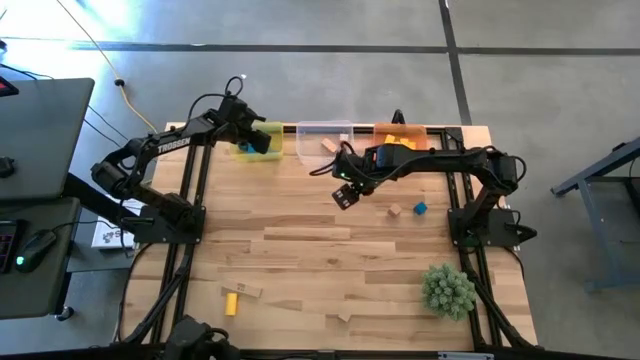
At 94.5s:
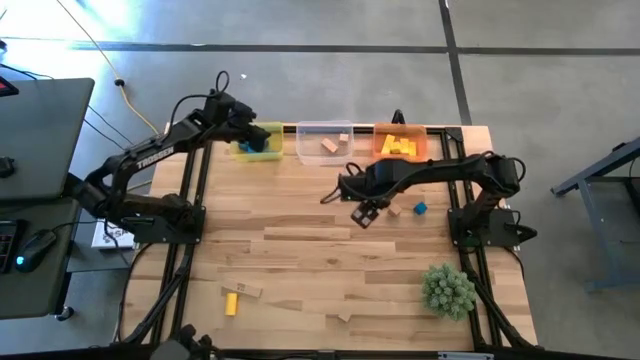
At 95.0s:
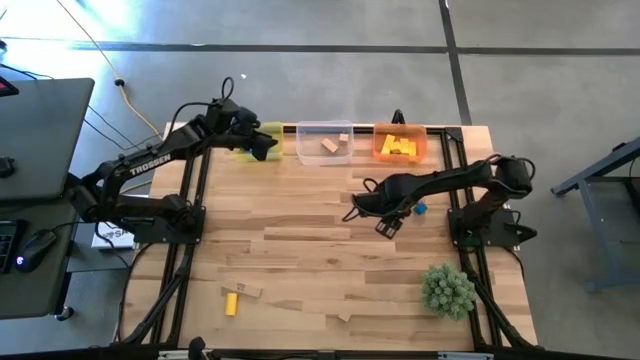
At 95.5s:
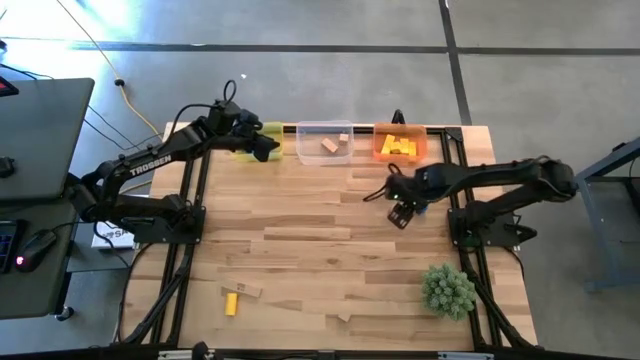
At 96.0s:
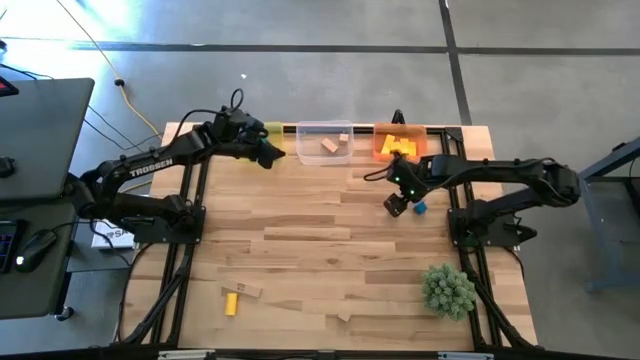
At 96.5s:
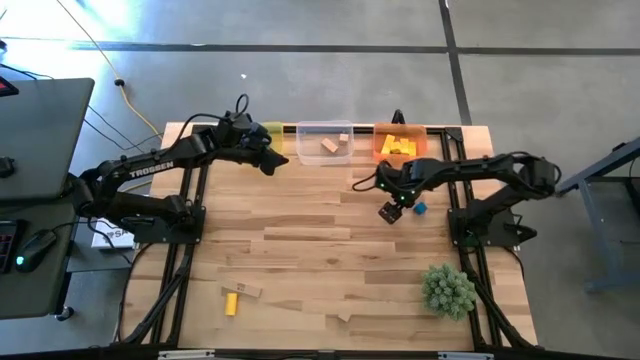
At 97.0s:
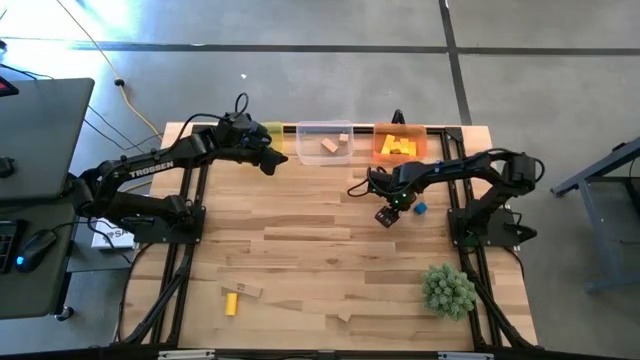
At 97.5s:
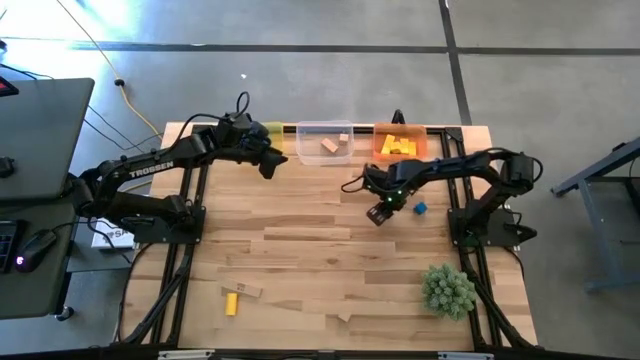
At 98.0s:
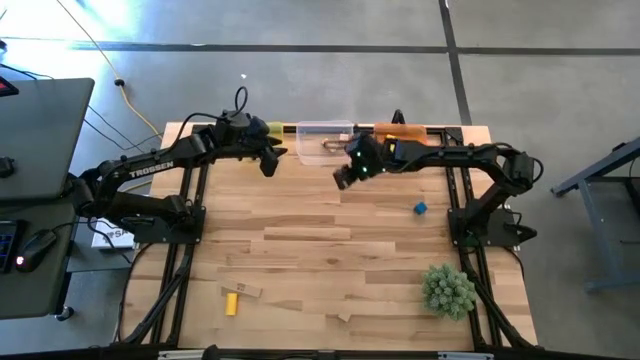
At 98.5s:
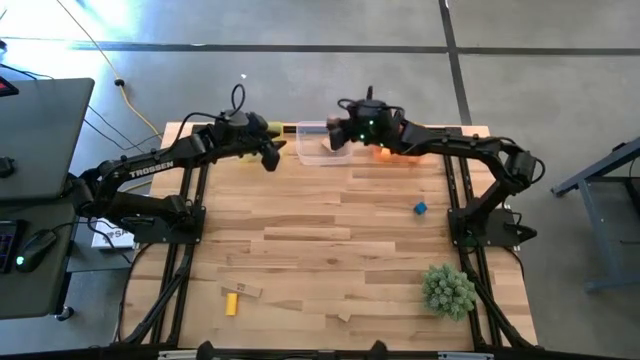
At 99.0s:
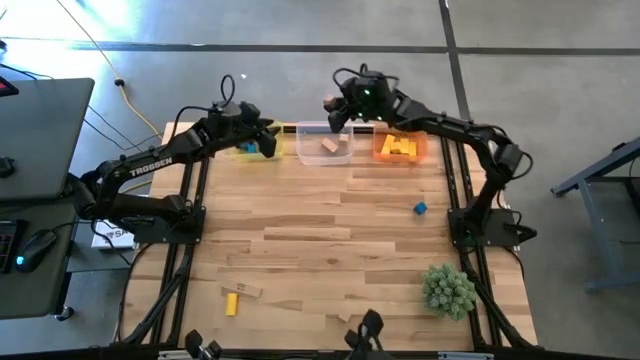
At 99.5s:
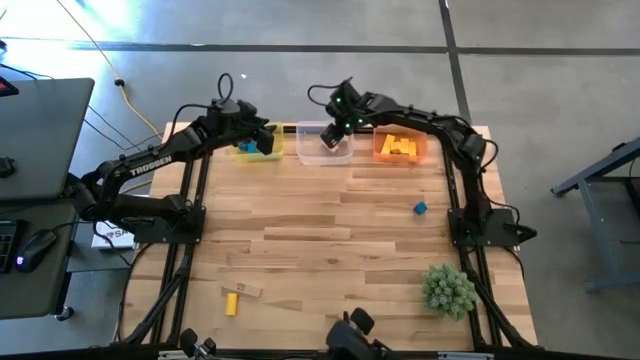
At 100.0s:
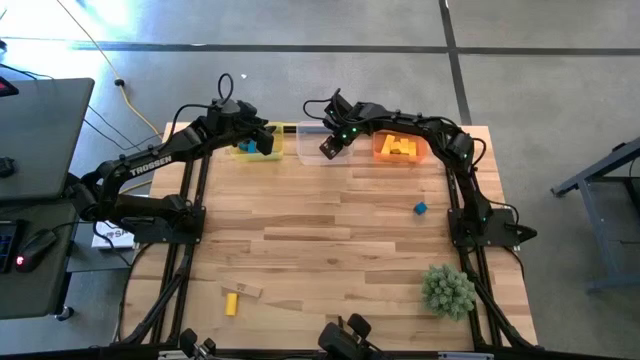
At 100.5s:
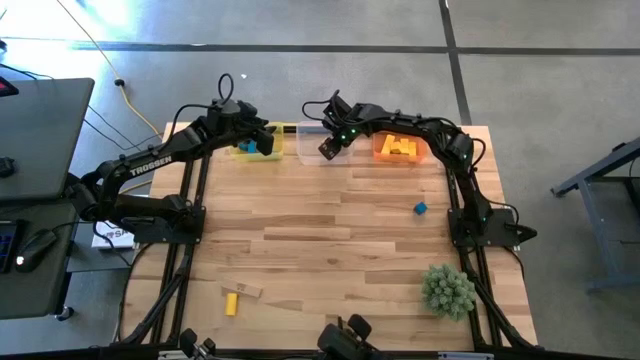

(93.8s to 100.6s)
Task: Sort & place blocks by color
Put the brown block into the transparent bin

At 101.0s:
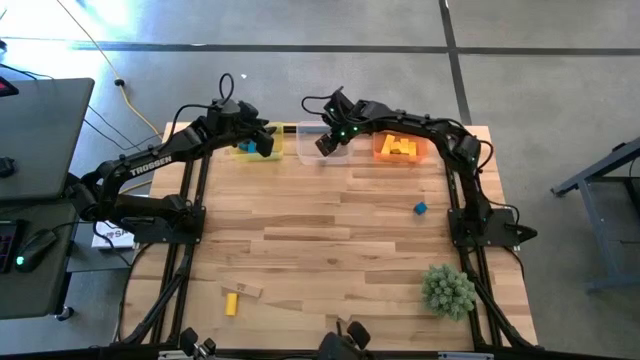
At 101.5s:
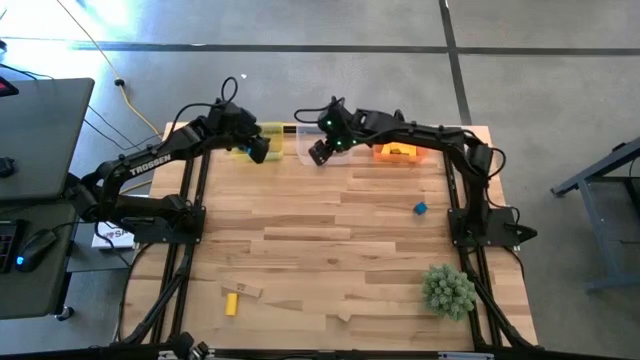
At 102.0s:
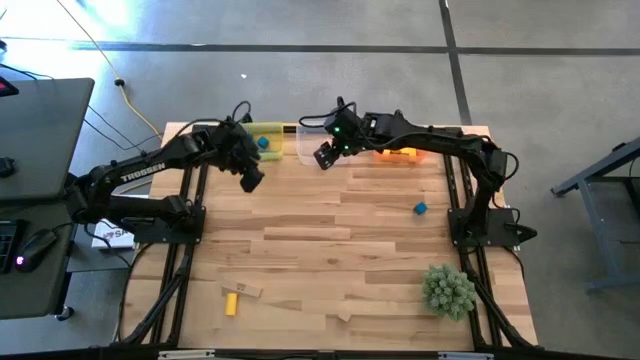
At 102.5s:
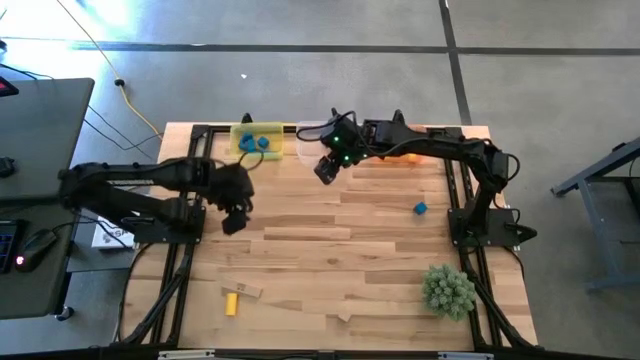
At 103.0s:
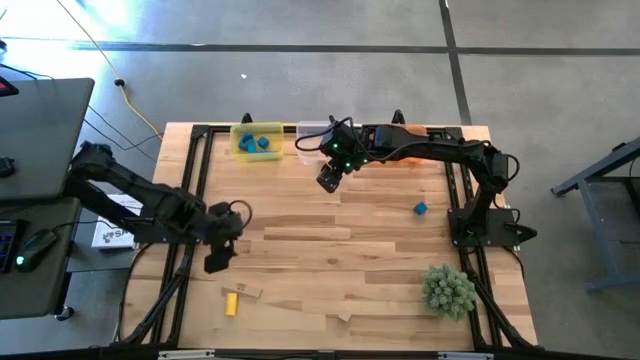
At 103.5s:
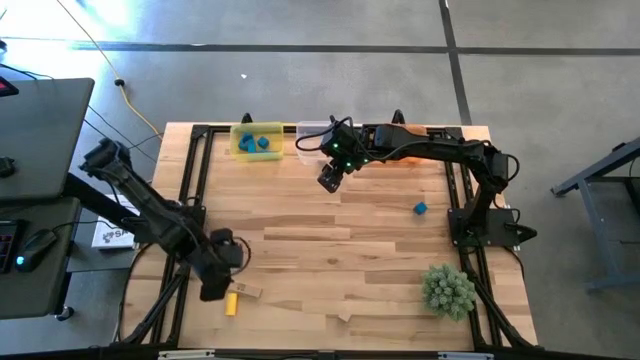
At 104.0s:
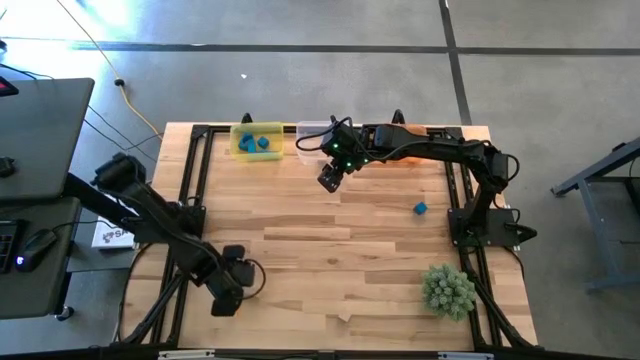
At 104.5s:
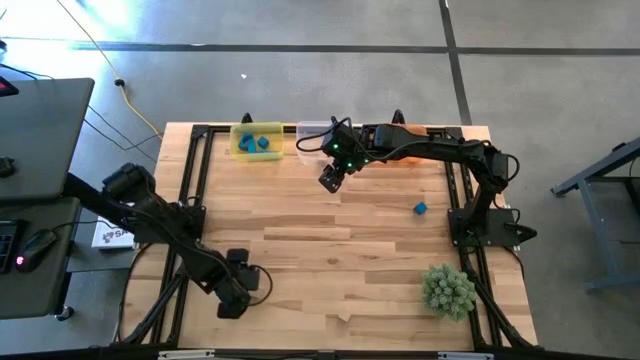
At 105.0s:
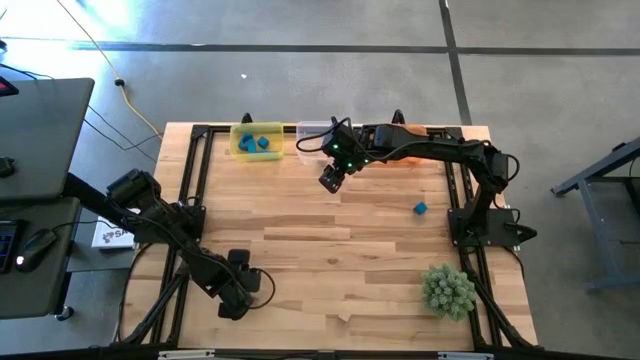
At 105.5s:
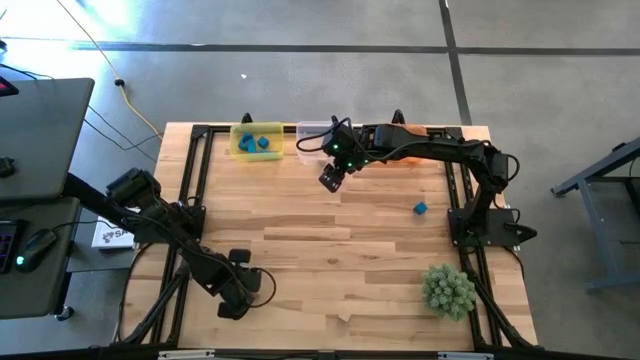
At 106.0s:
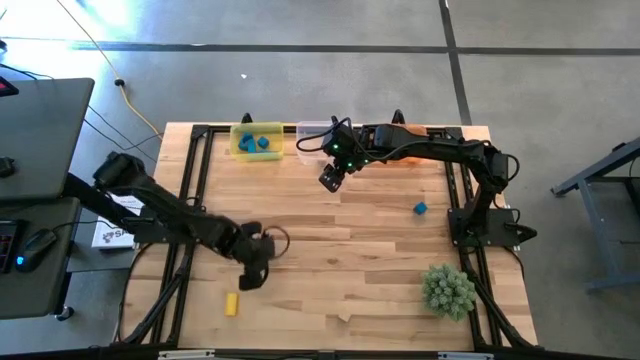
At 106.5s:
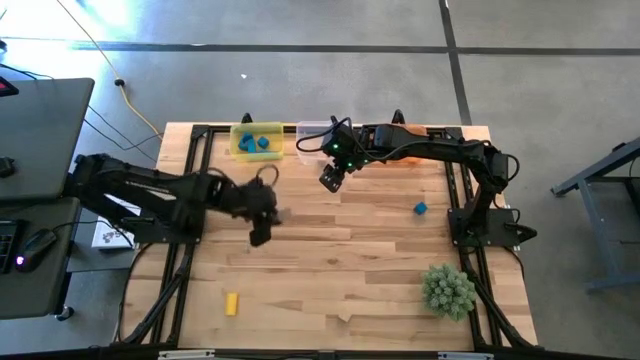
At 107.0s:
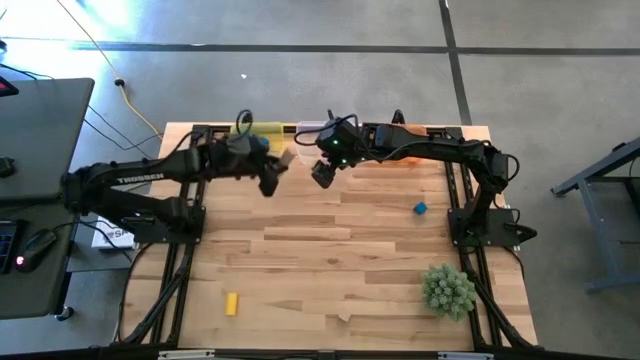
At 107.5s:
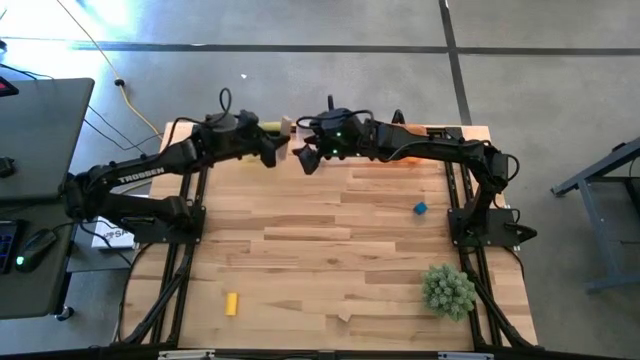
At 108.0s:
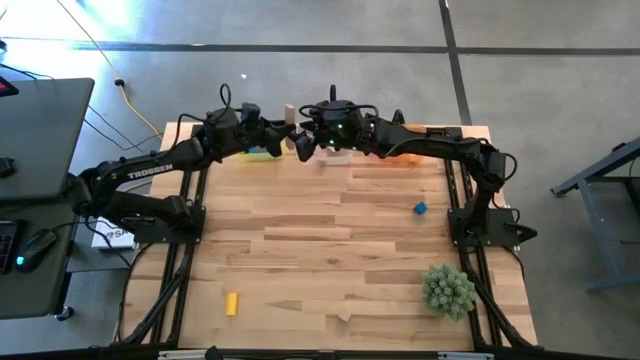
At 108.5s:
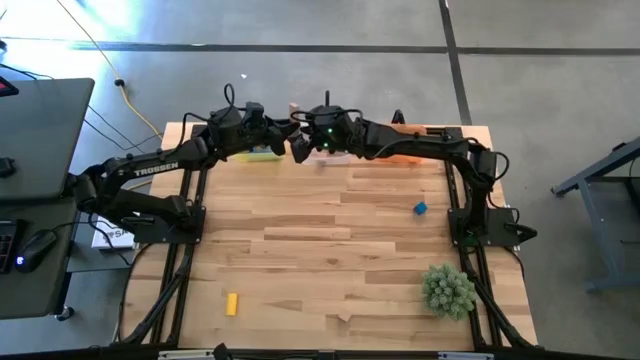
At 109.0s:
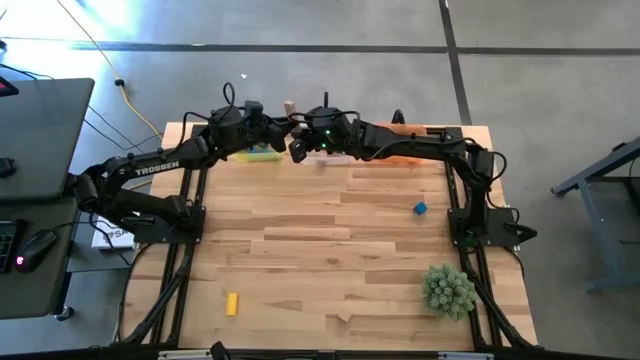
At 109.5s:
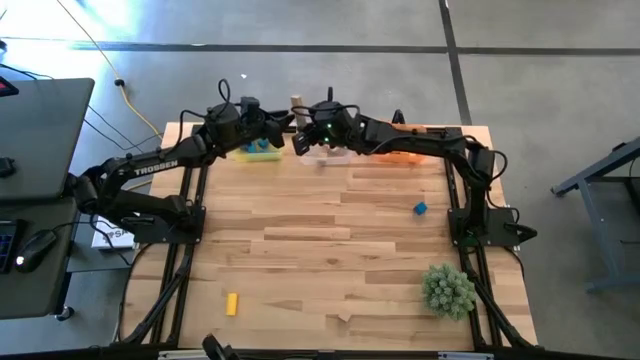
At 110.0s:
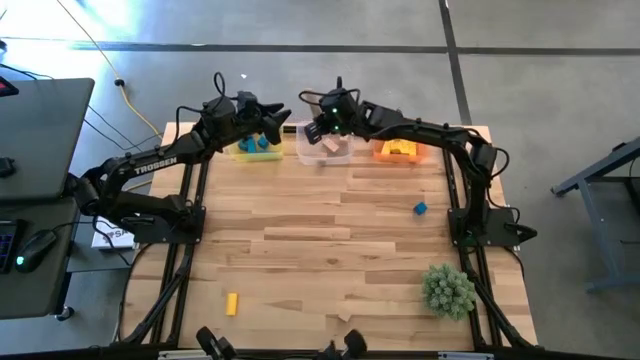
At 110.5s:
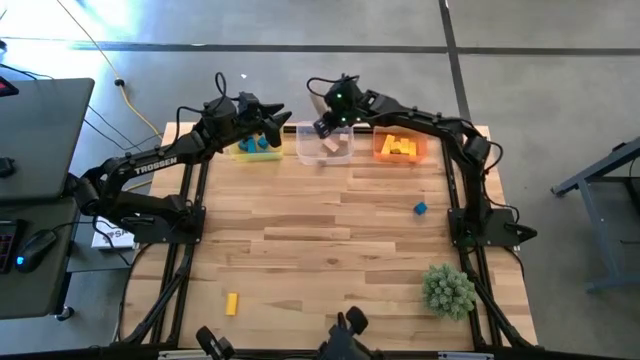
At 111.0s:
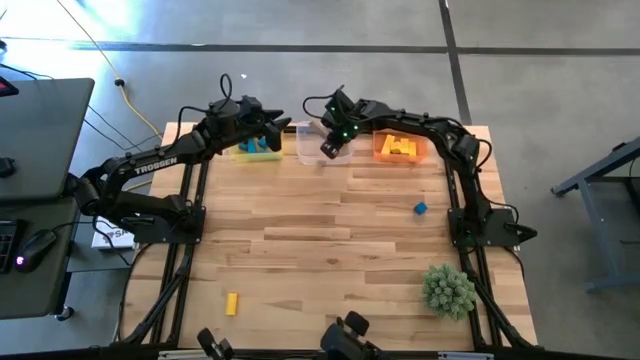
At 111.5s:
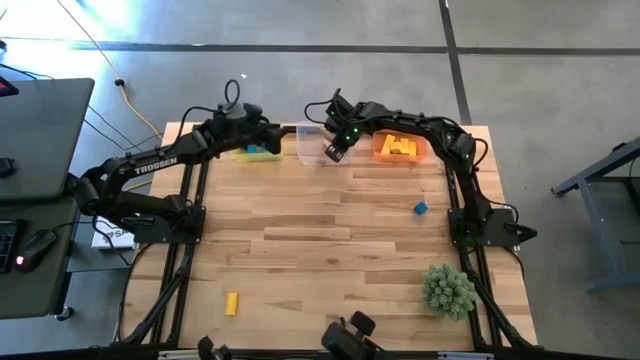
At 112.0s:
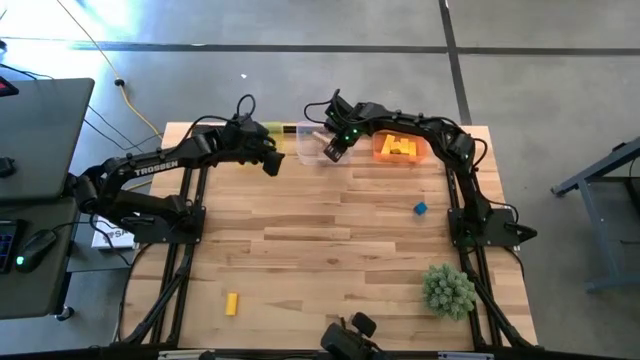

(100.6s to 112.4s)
Put the light brown block into the transparent bin

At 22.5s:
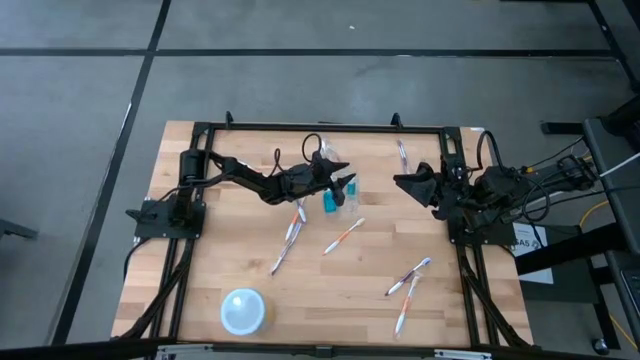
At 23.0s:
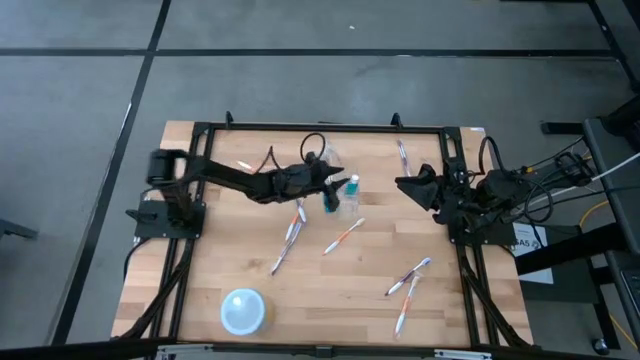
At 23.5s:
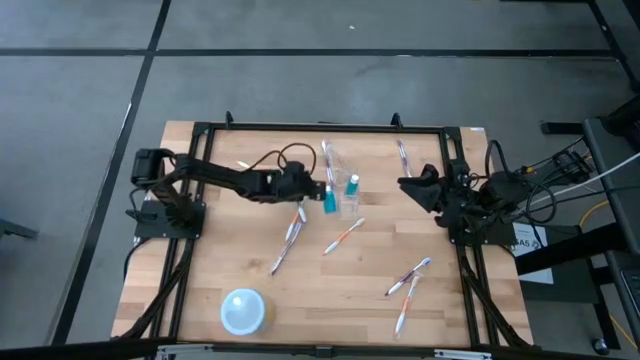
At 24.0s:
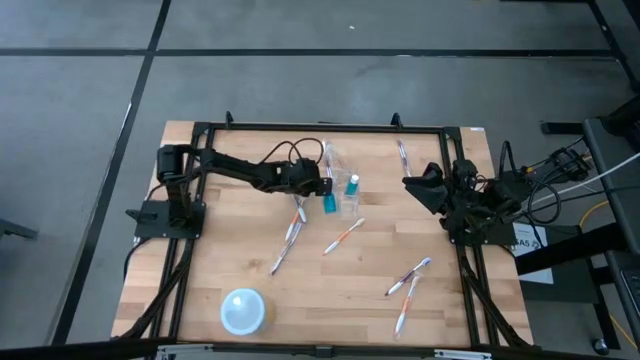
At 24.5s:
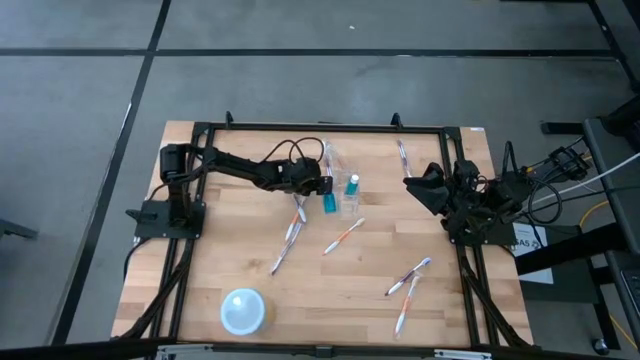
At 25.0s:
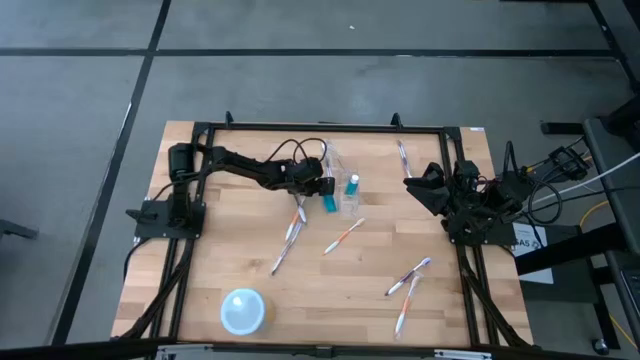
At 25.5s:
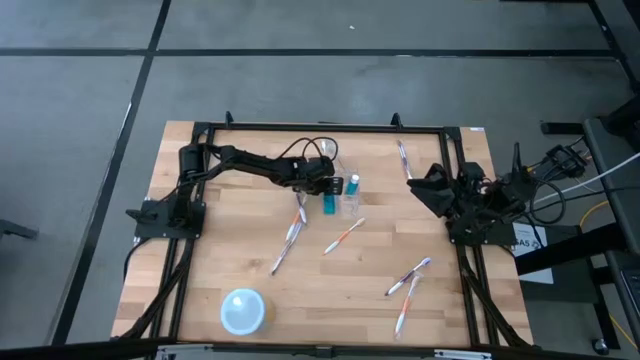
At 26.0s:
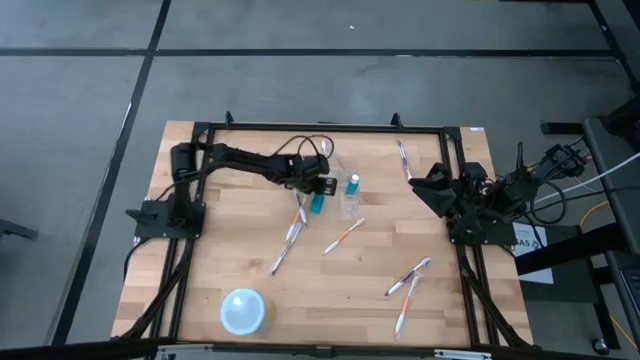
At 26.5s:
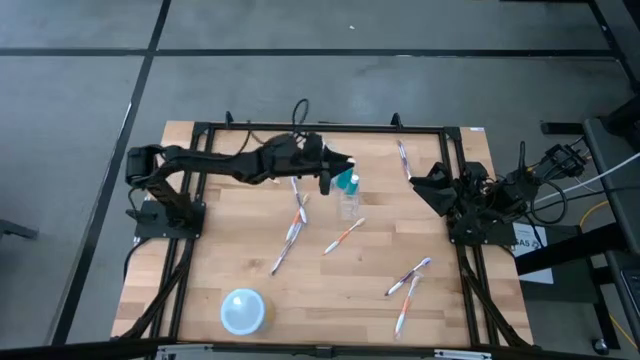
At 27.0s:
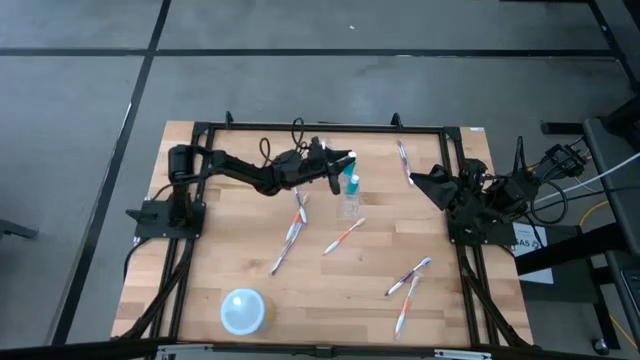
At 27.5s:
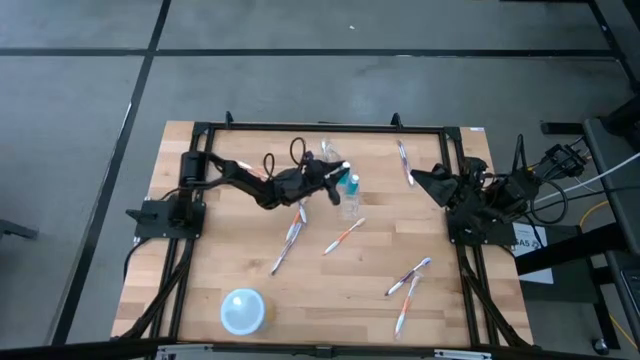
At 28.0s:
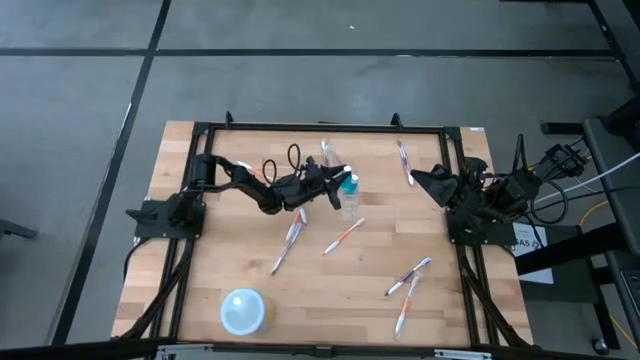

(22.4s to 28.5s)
Task: Pick & Place toothbrushing station
Put the blue mouthwash bottle into the transparent organizer
